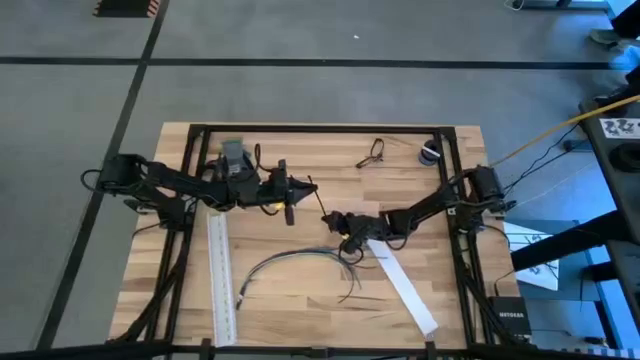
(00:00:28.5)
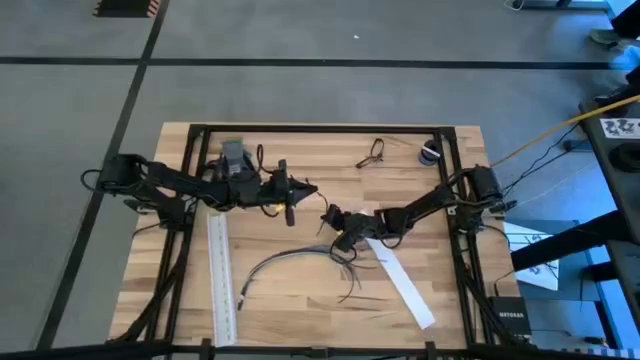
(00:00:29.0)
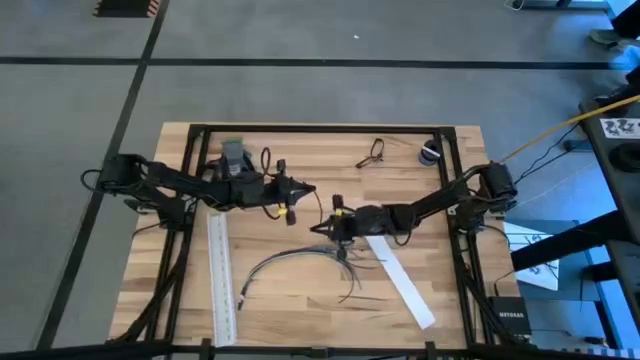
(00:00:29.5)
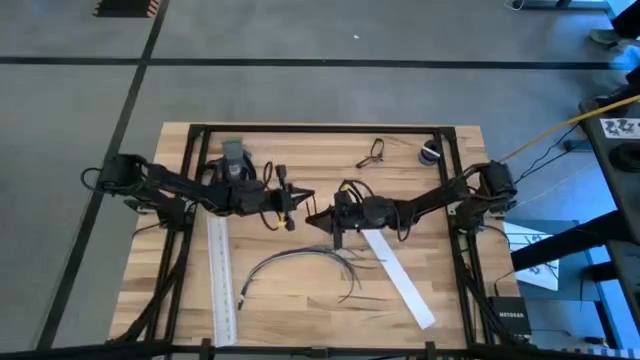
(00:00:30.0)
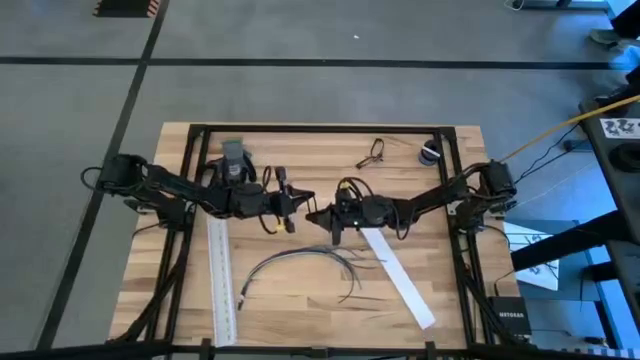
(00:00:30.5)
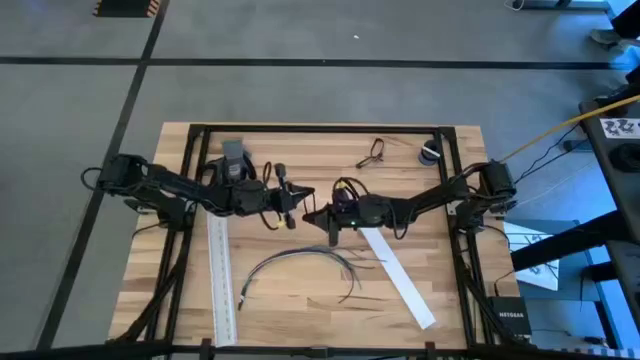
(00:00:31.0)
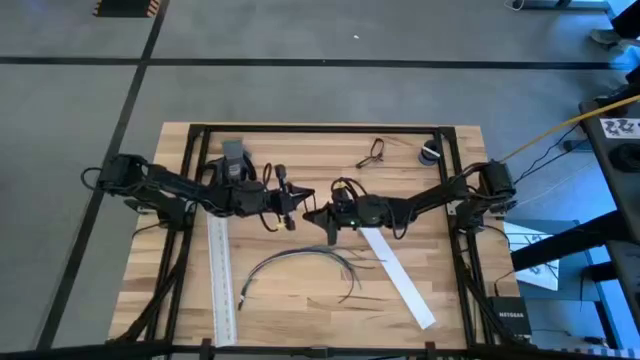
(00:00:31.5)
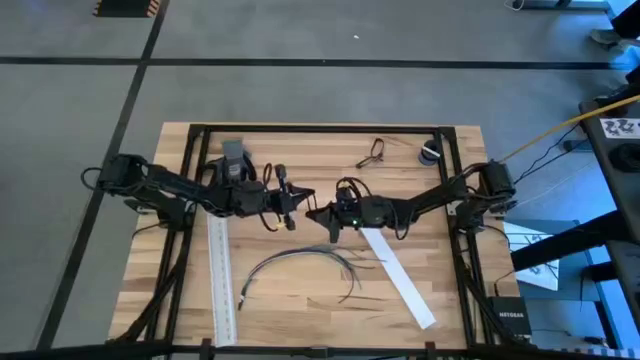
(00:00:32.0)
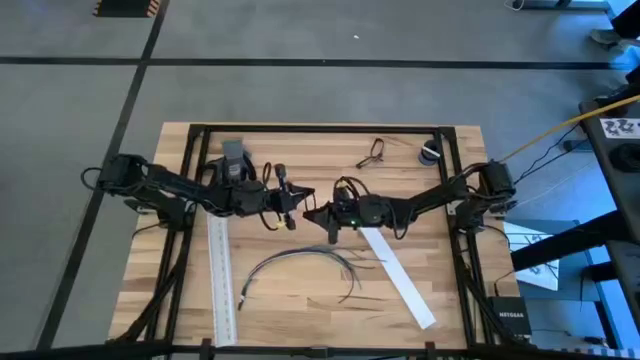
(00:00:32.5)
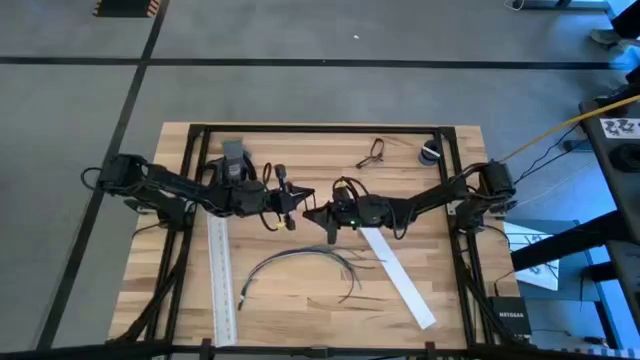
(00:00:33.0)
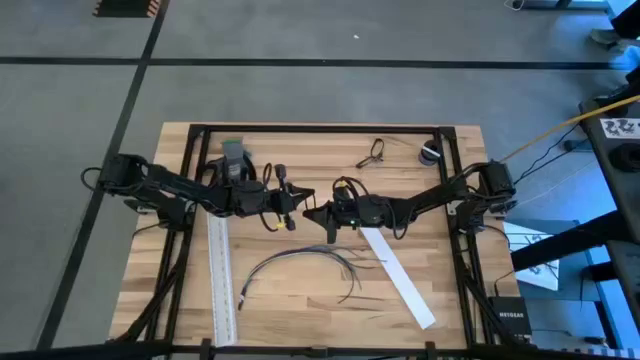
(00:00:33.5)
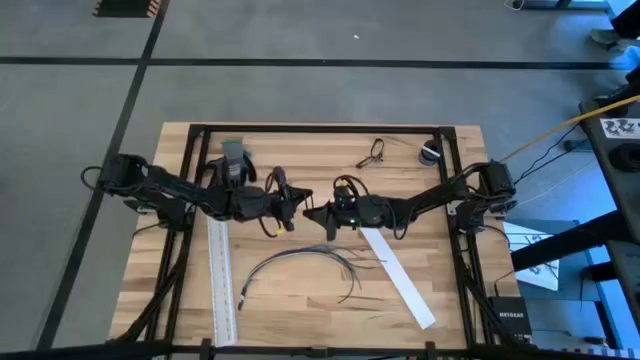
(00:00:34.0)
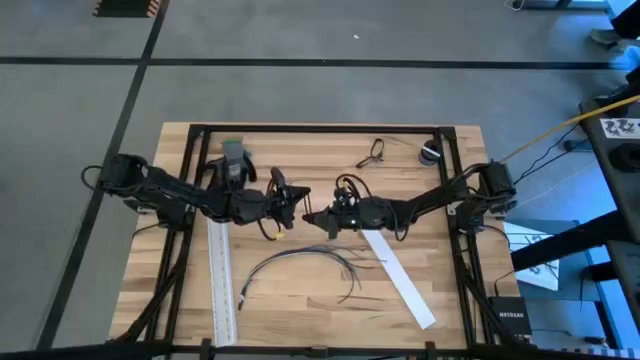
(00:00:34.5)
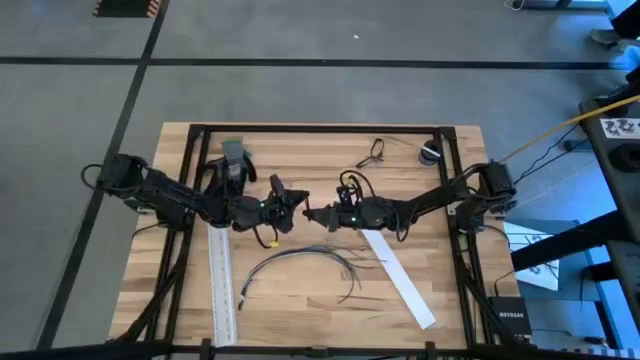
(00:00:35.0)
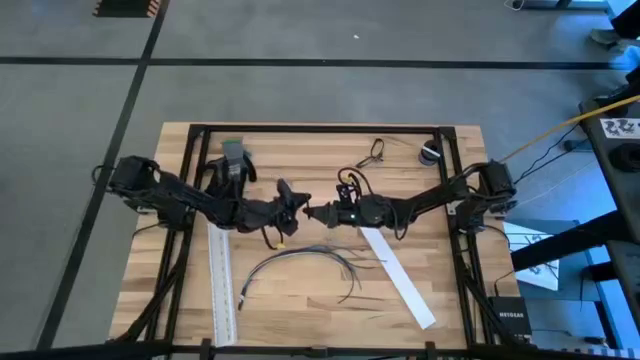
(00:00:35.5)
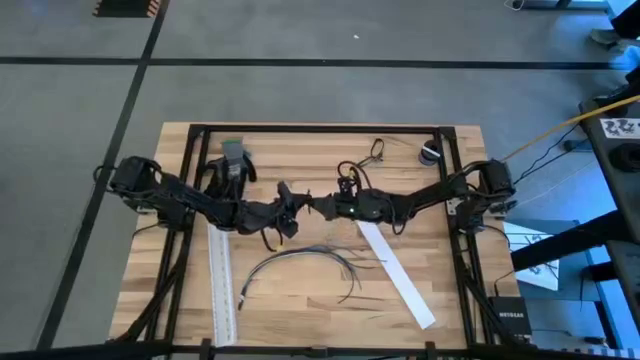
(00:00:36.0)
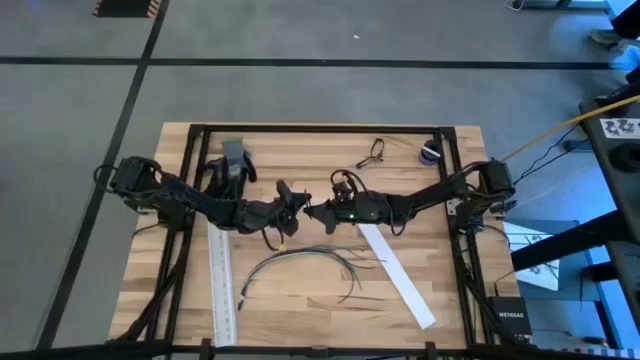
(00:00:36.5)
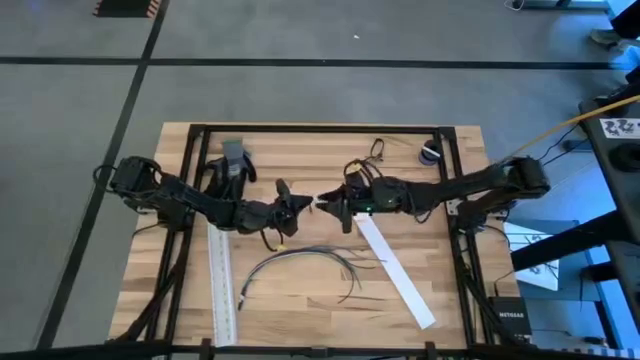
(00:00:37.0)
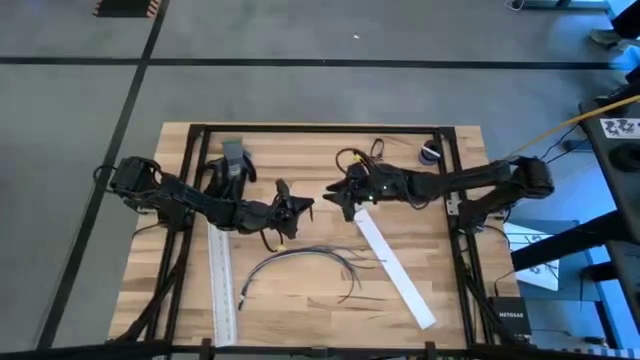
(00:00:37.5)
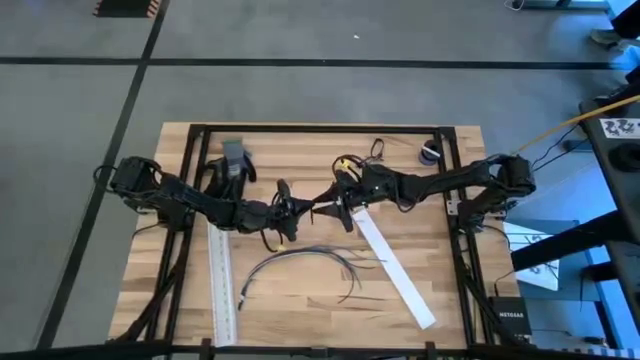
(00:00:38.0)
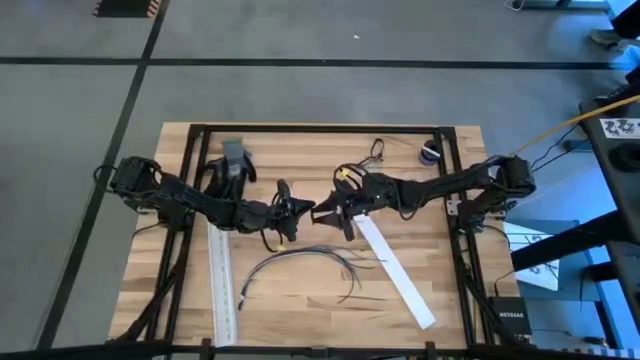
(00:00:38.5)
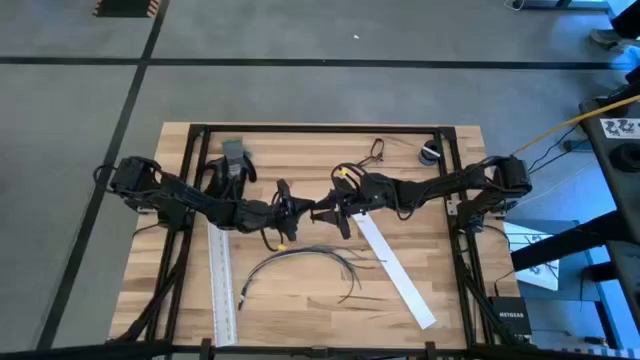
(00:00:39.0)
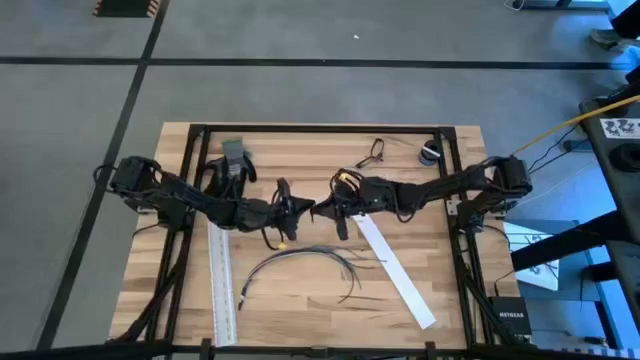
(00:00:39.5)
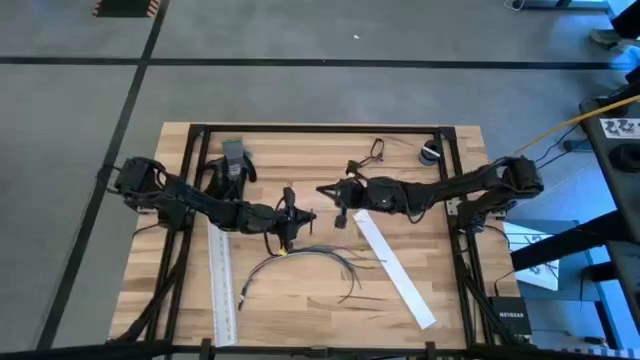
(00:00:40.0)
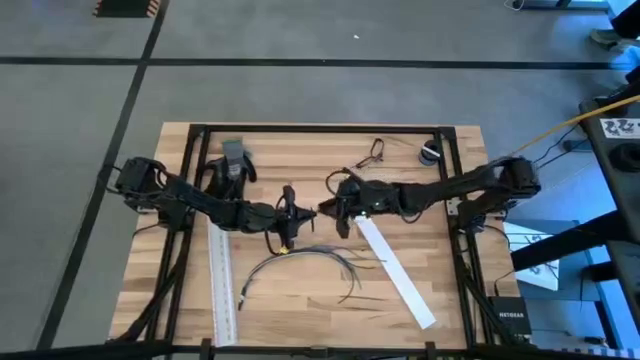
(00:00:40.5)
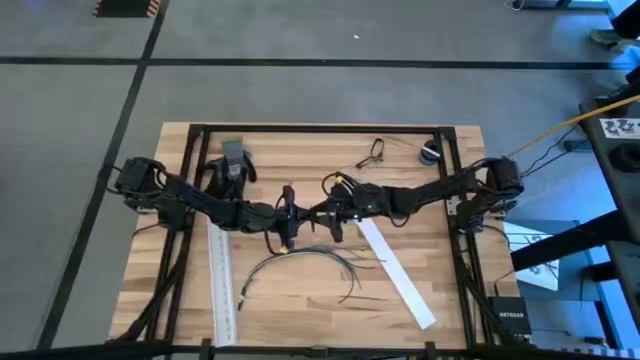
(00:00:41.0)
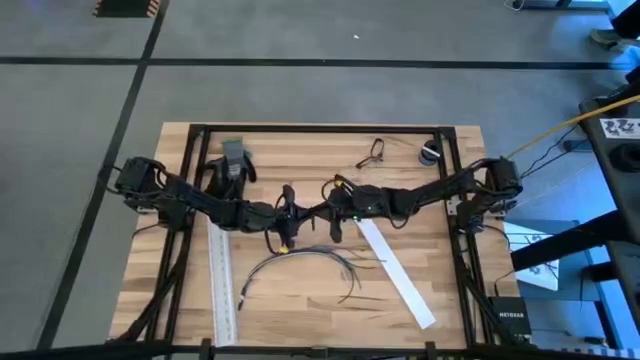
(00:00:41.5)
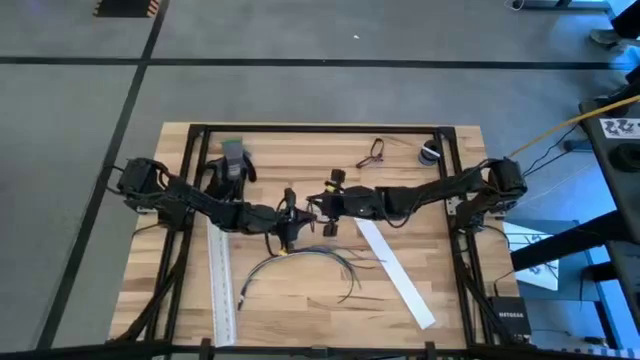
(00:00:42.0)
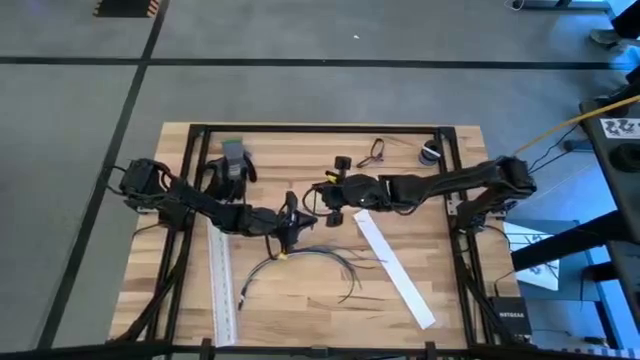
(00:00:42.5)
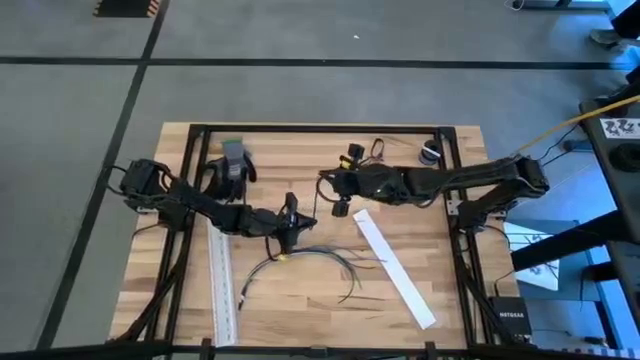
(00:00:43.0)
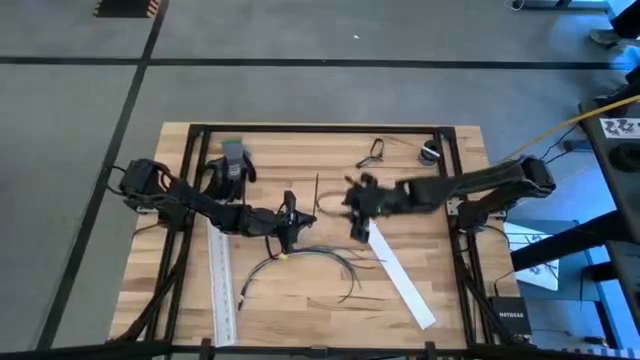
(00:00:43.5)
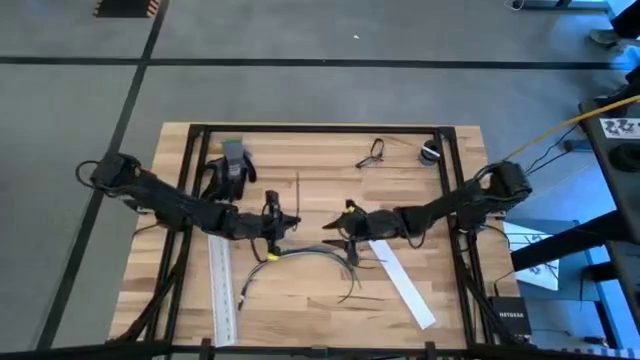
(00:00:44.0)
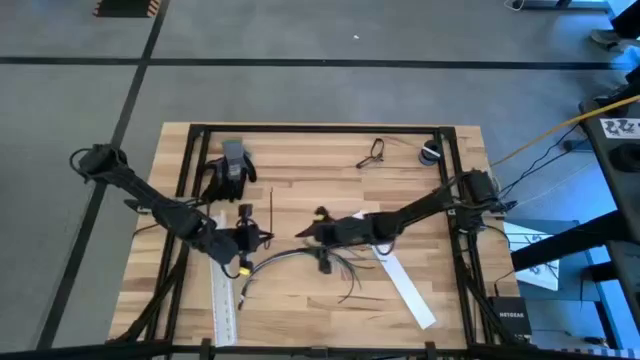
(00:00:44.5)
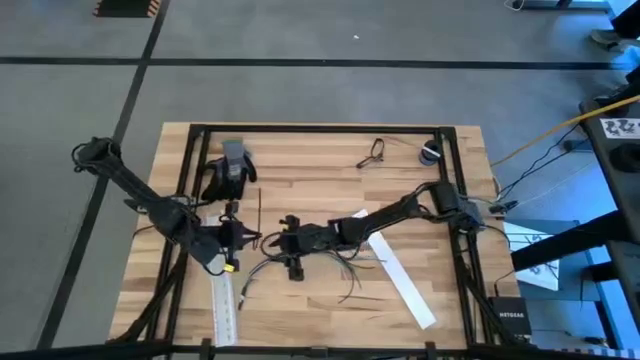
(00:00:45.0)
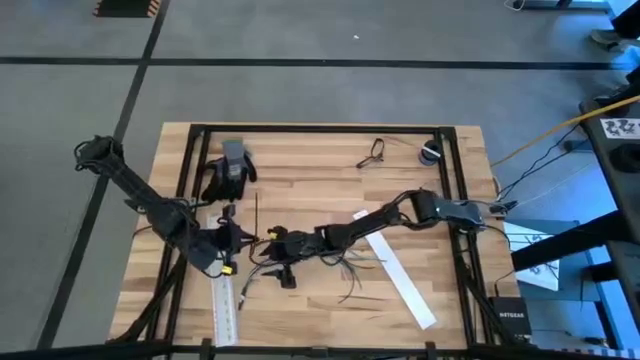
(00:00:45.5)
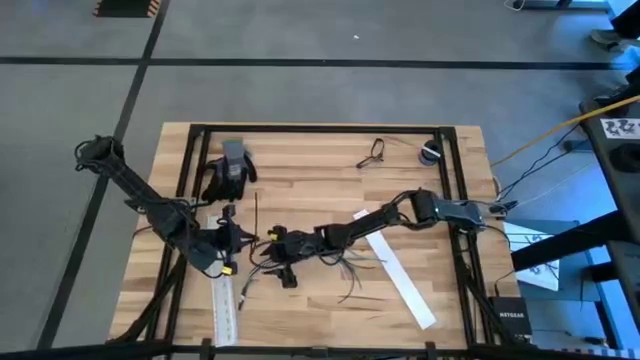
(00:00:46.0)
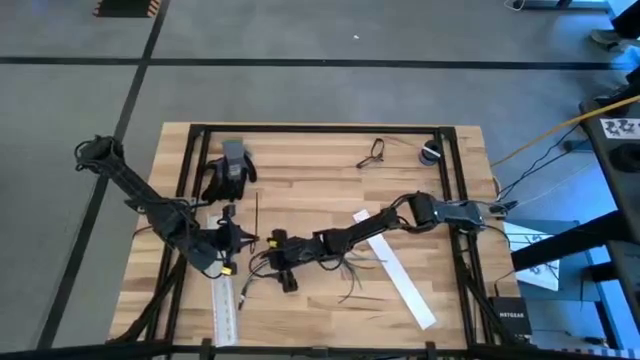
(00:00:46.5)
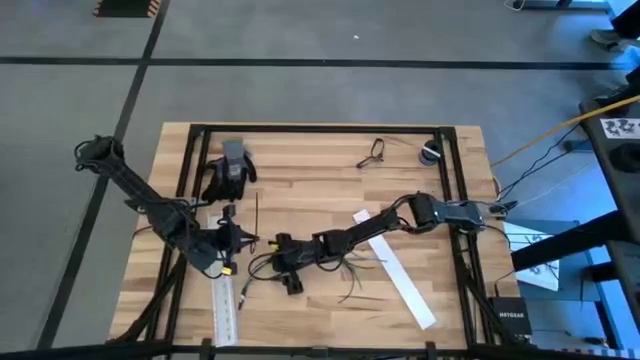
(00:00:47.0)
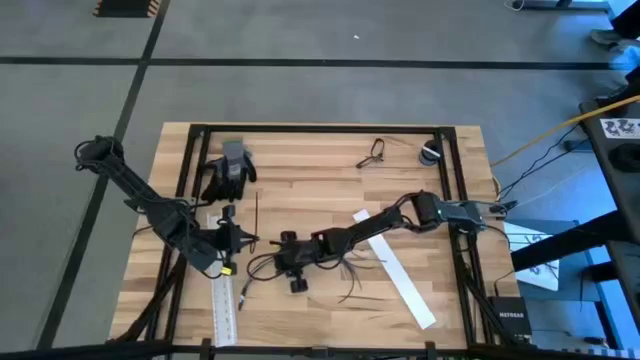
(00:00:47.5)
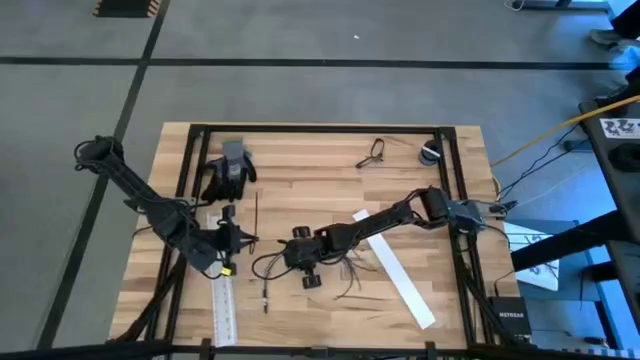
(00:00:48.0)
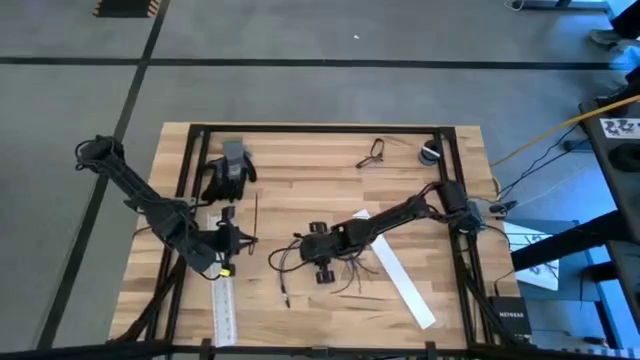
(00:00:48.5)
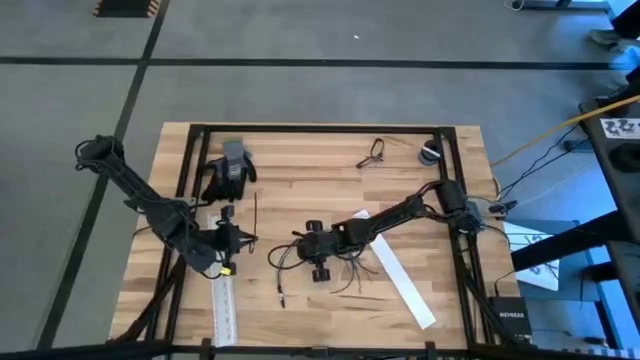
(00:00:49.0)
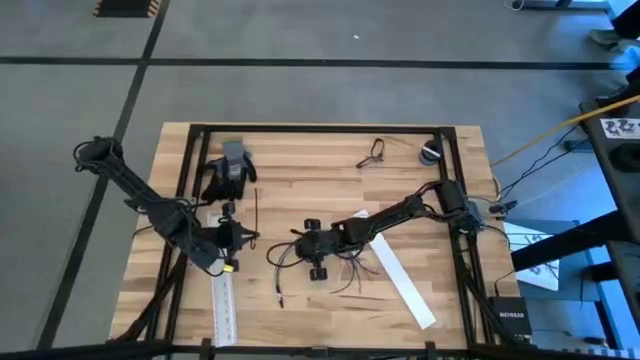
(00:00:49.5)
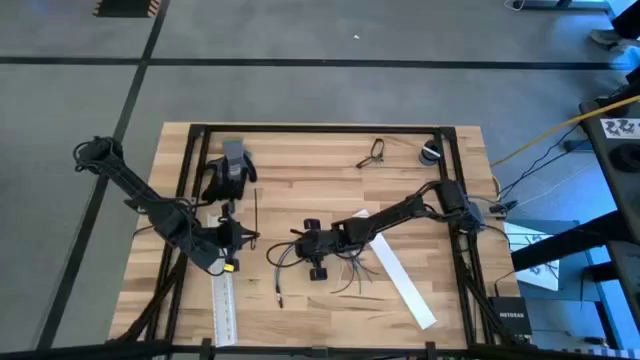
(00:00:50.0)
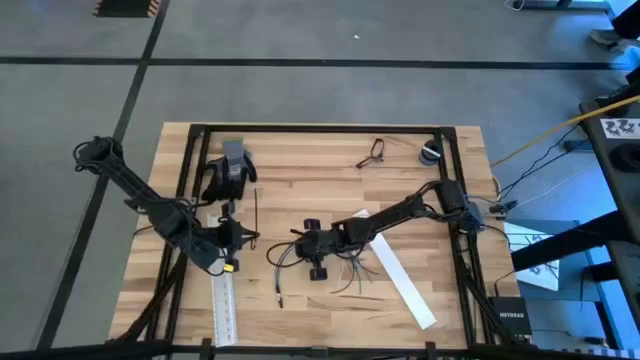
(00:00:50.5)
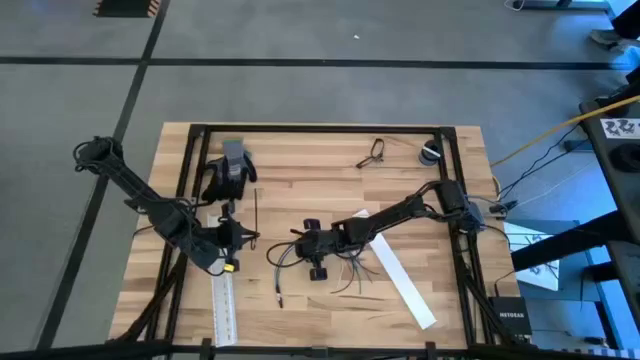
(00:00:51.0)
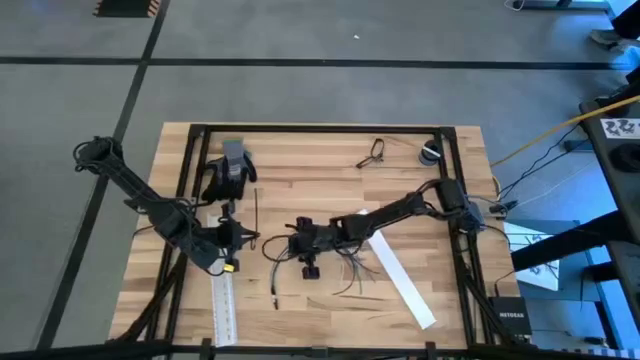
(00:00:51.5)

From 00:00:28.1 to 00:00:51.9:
Task: Ziptie cables
Put the black zip tie on the cable wires
